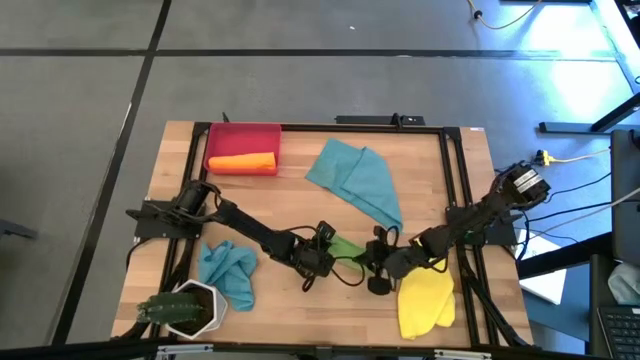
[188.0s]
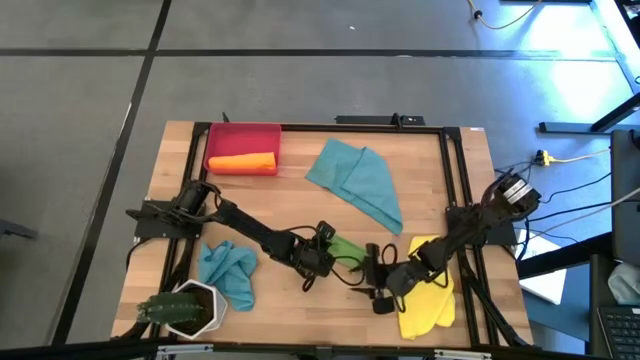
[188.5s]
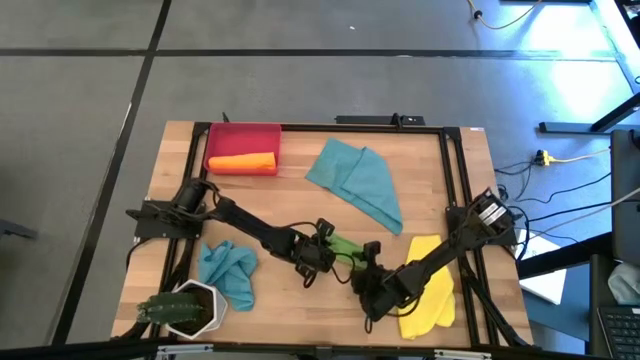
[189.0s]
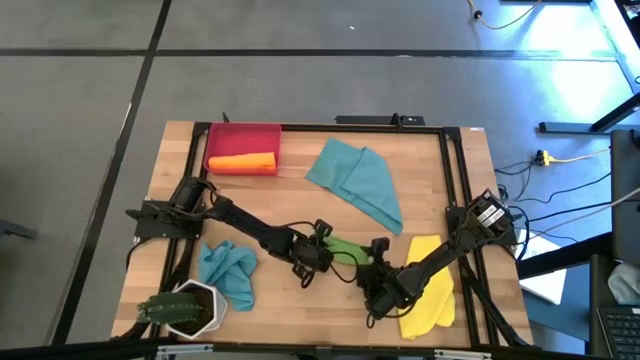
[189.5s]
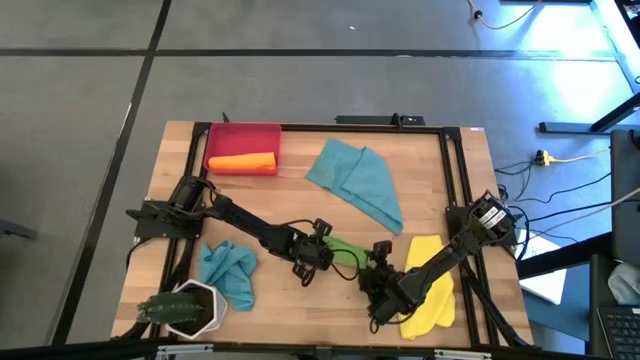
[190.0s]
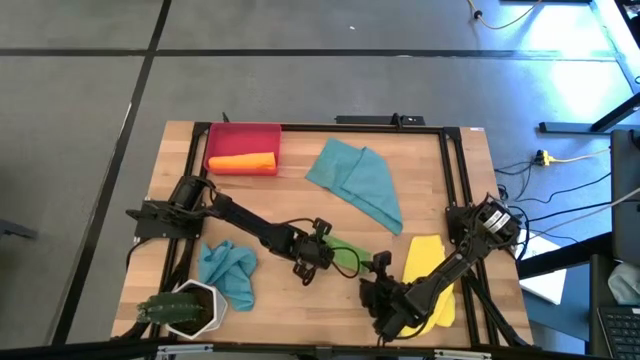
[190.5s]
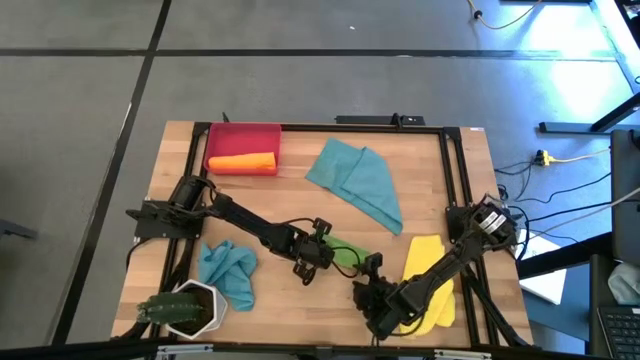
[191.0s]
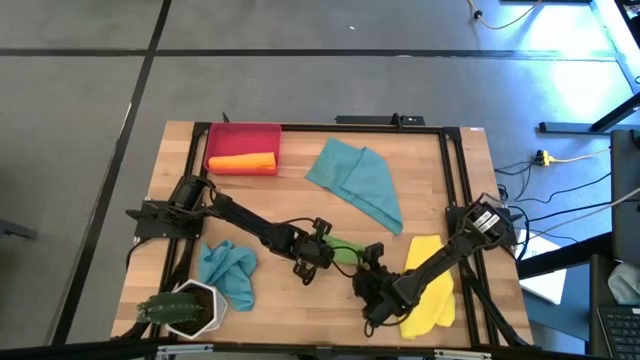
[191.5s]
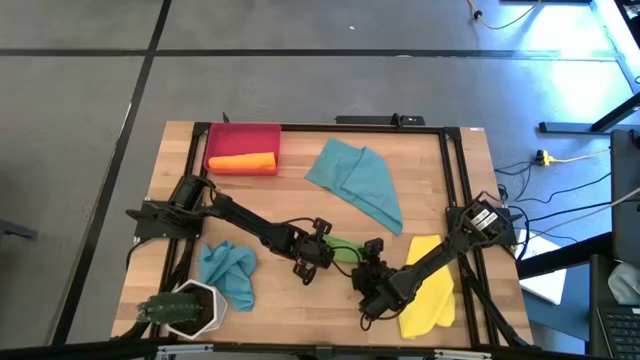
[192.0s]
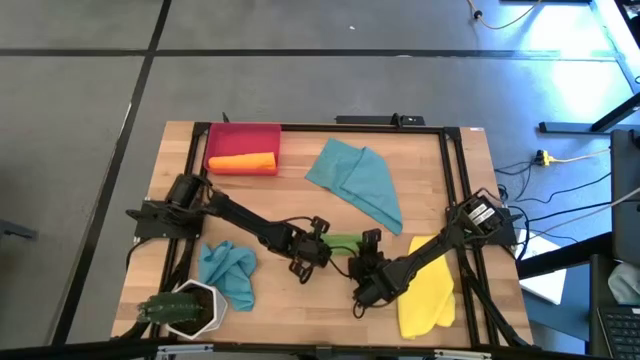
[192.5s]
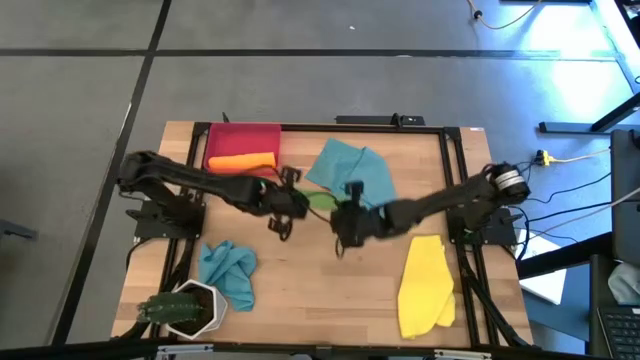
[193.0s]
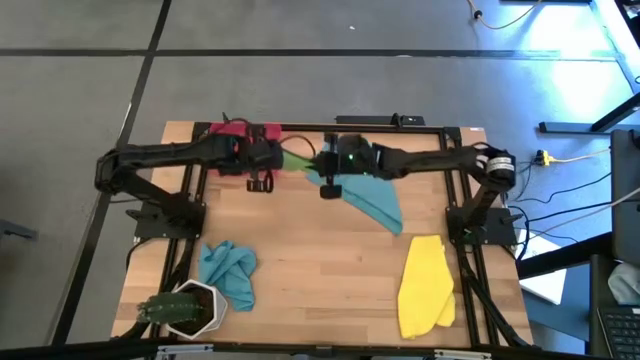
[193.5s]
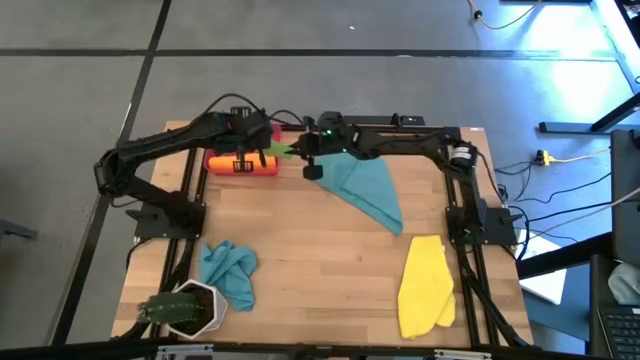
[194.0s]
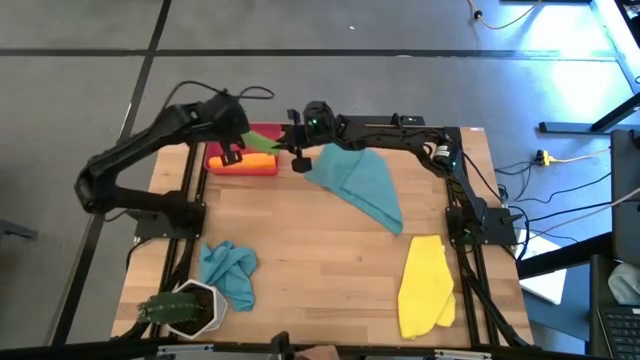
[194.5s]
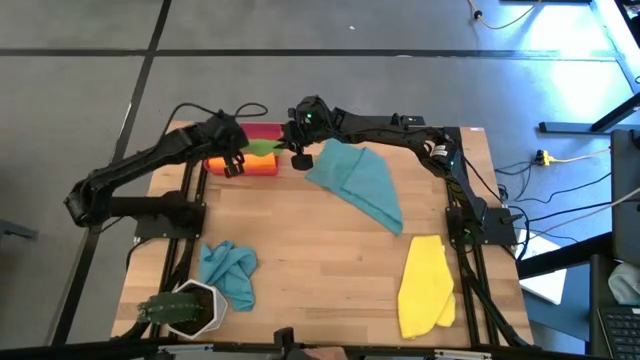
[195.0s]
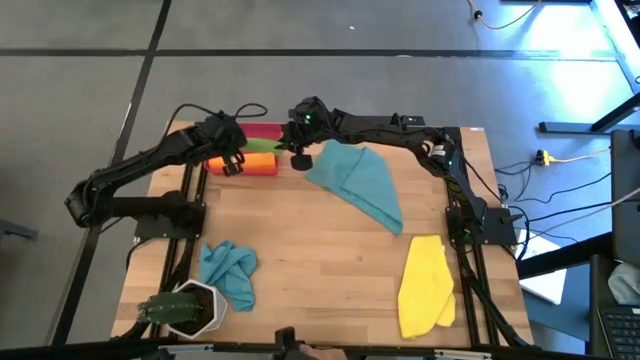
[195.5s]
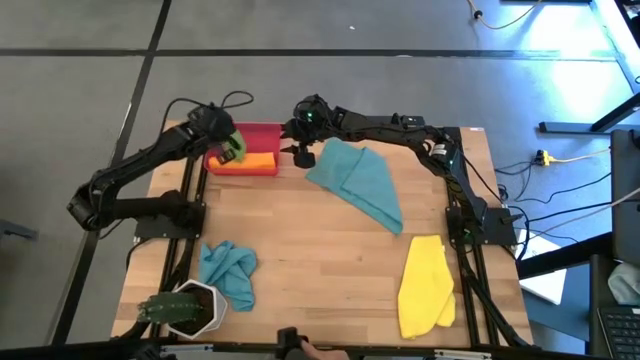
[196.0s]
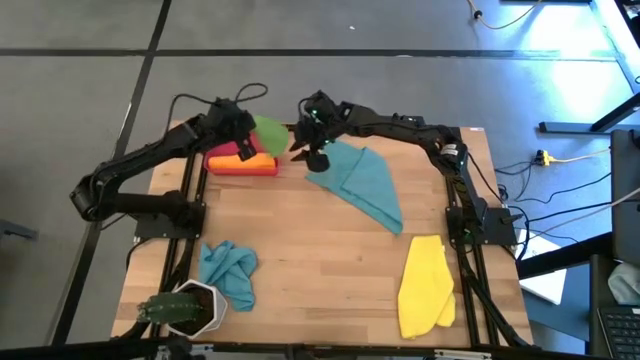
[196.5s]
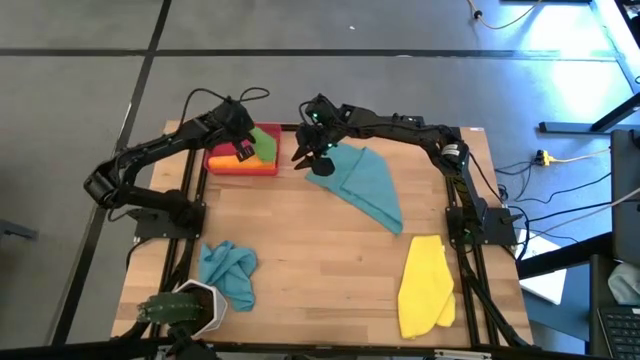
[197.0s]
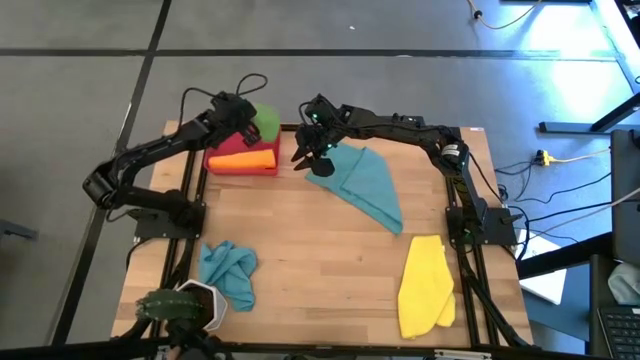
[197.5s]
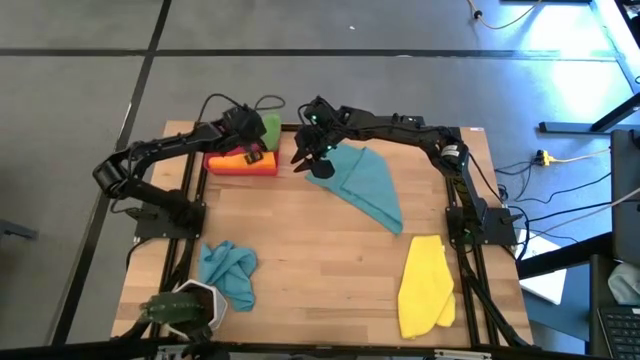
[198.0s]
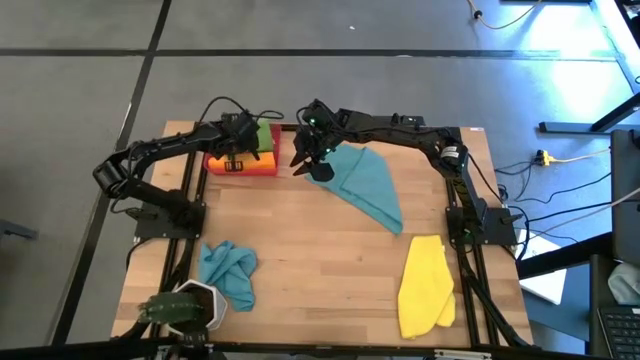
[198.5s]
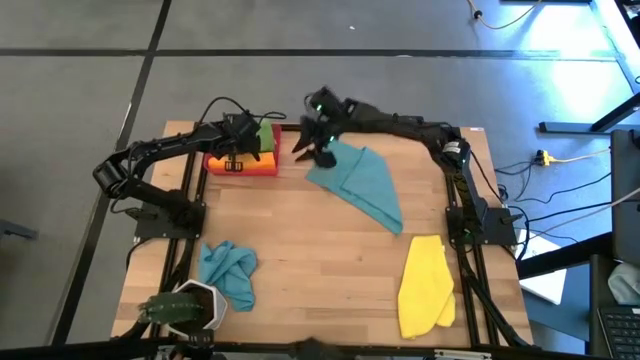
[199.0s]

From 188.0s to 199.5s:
Task: Roll microfiber towels into tight, uniform cylinder then place into a basket
Put the rolled green microfiber towel into the red bin

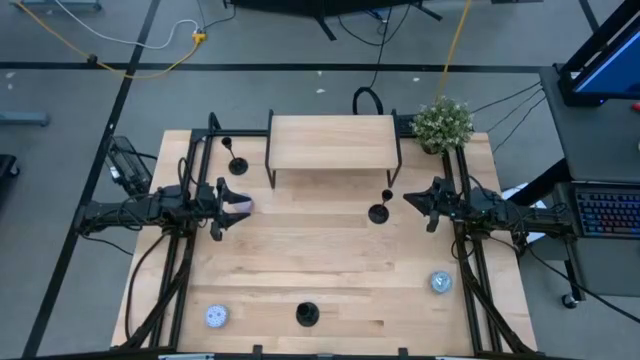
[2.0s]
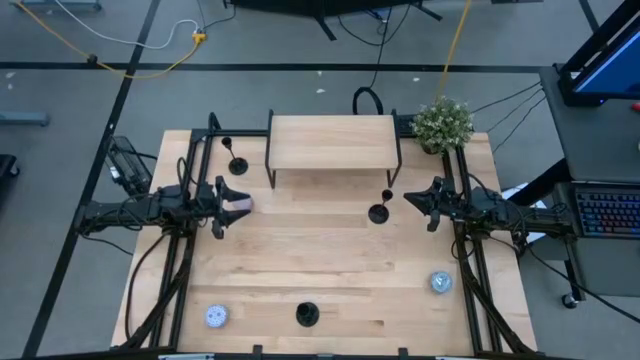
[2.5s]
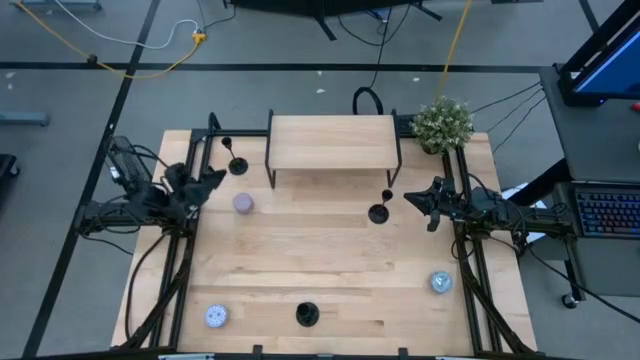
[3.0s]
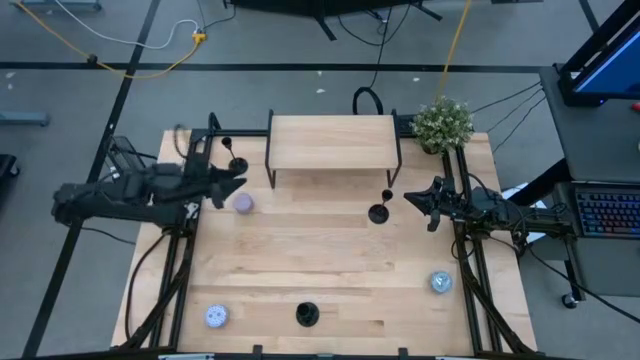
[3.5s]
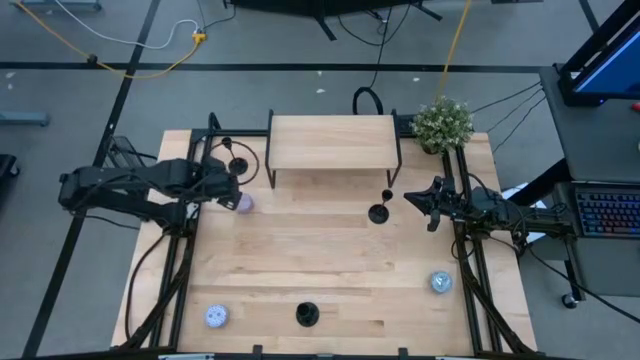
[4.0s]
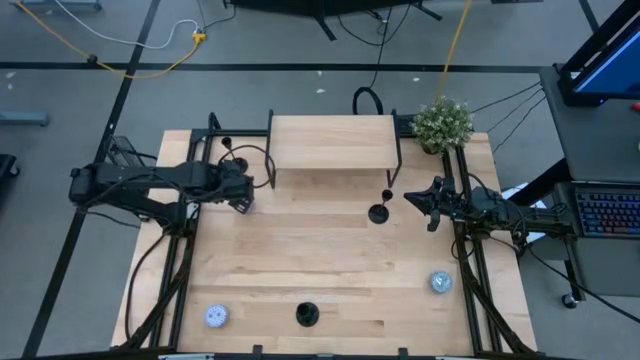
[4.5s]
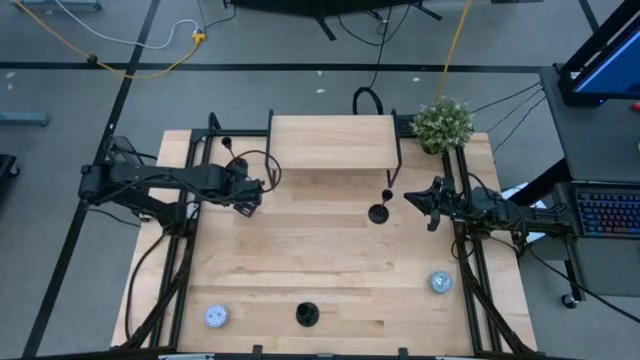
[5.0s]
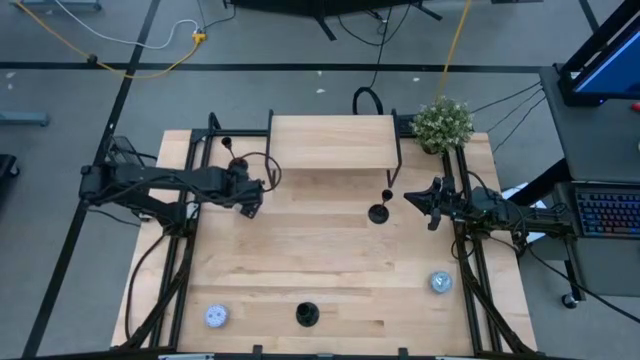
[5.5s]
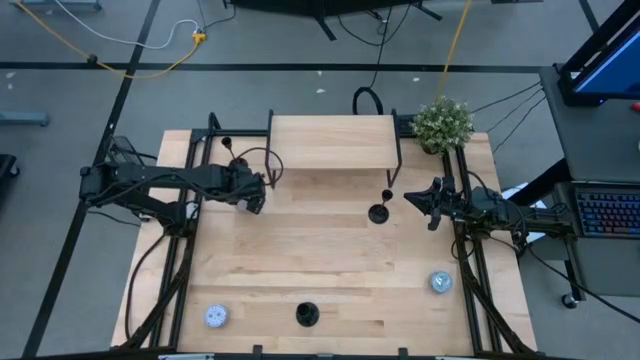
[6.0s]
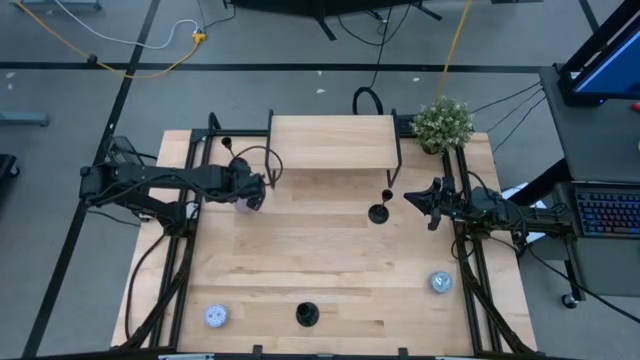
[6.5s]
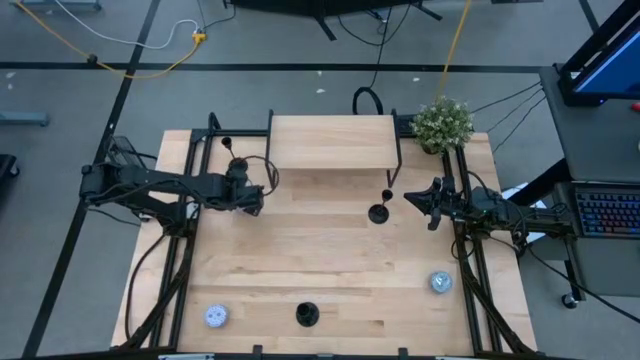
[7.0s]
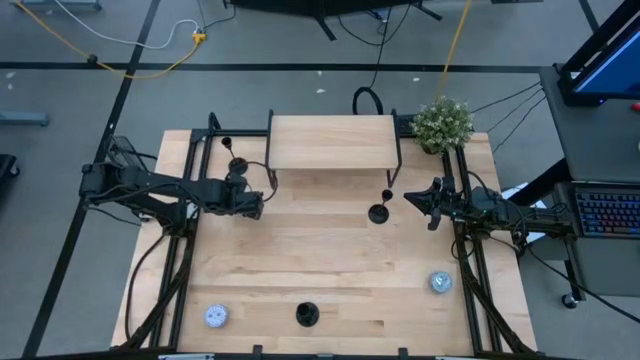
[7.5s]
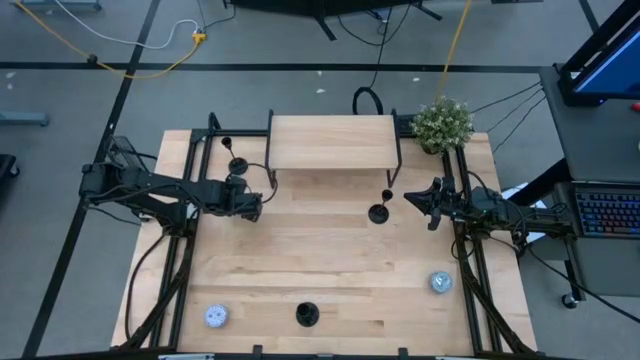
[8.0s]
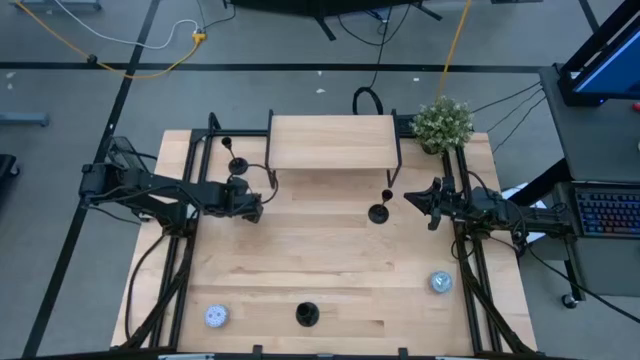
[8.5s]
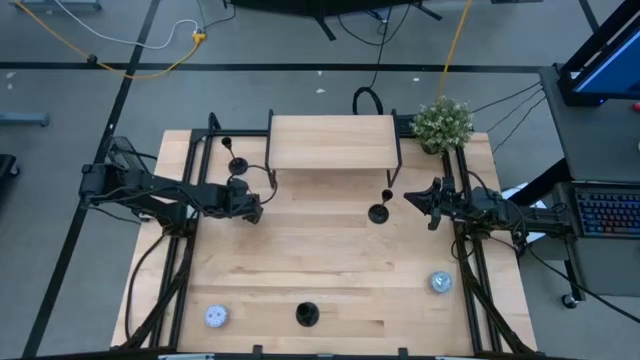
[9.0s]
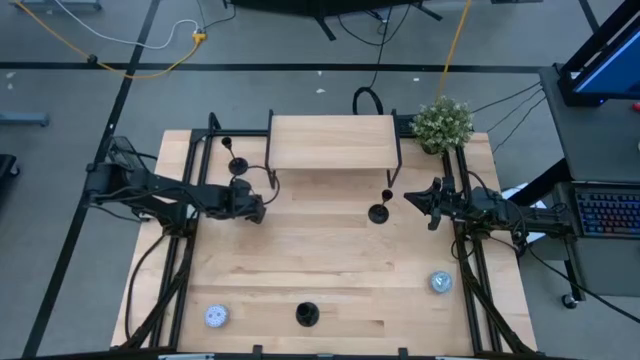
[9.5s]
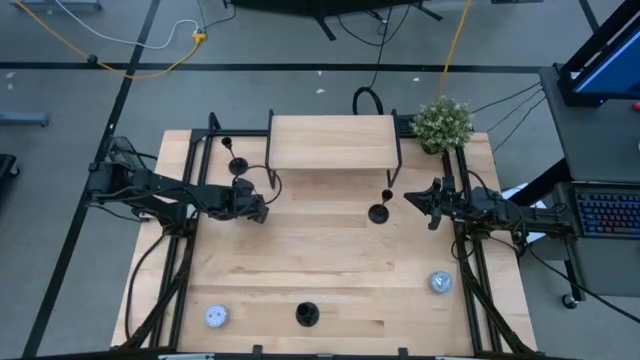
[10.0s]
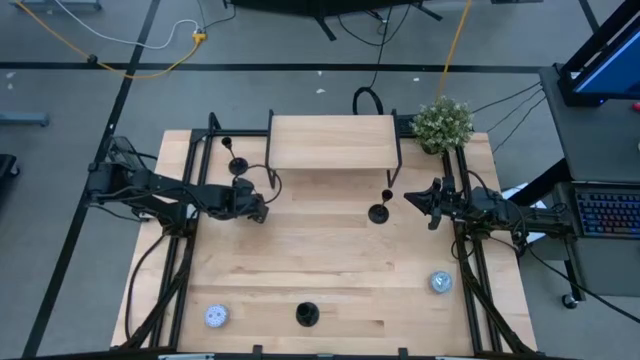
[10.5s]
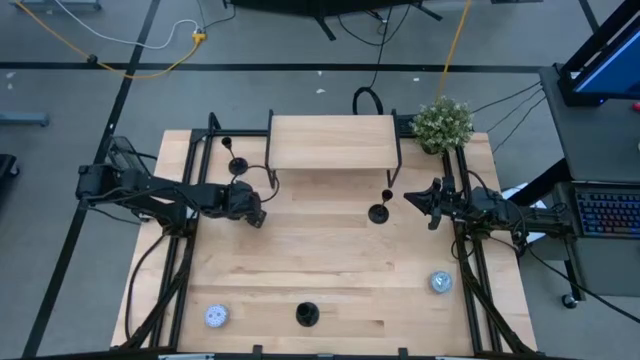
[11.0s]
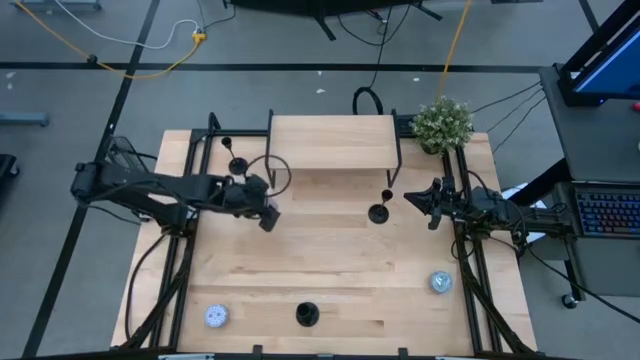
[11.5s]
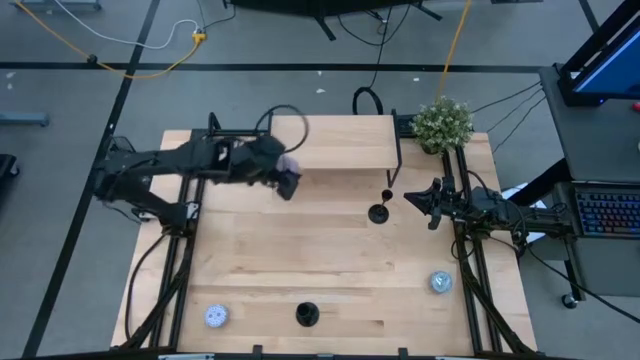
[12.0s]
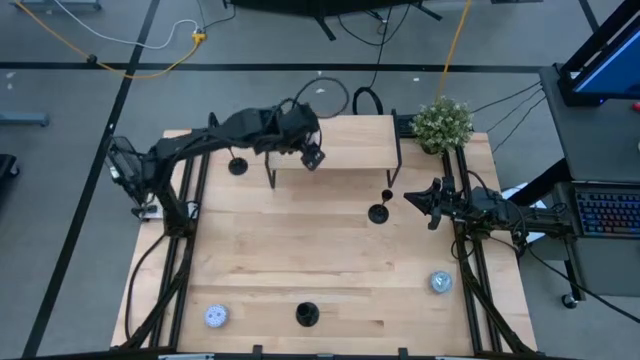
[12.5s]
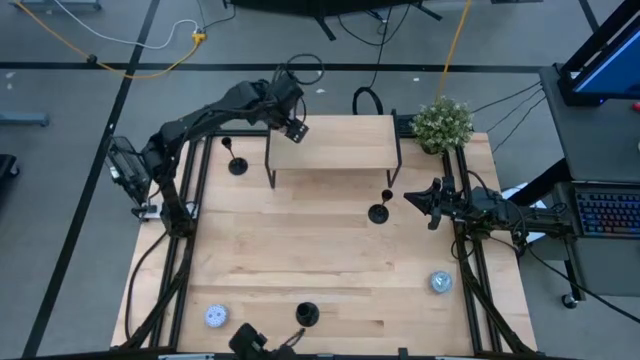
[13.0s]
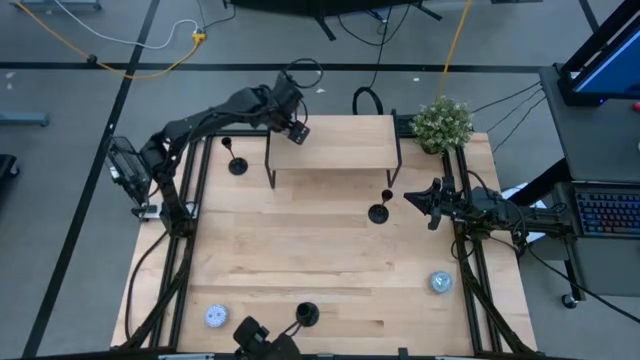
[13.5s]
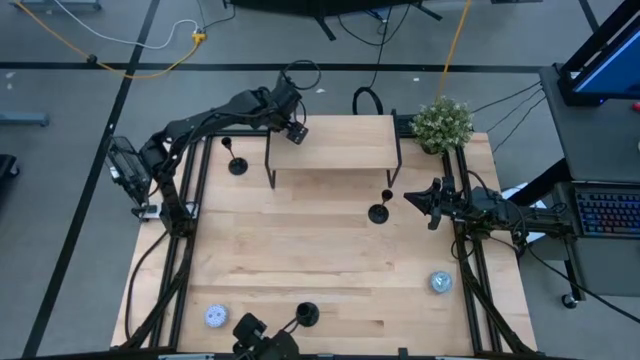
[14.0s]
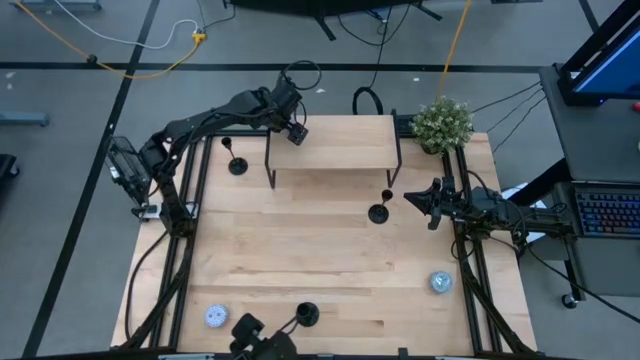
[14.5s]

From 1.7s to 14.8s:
Task: Pick & Place candle stick holders
Put the pink patterned scented candle on the shelf
